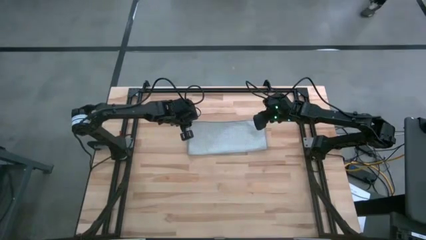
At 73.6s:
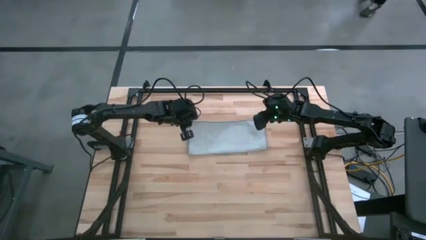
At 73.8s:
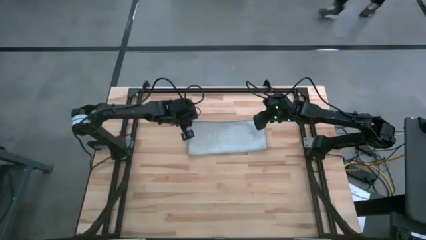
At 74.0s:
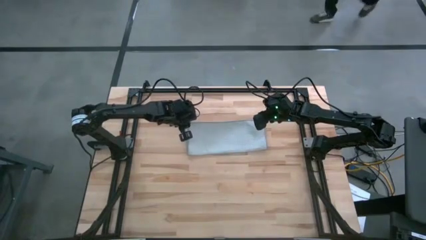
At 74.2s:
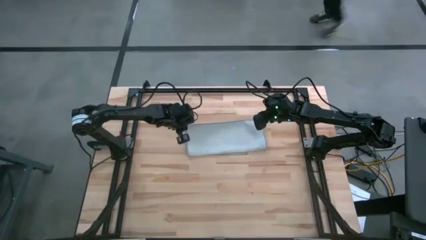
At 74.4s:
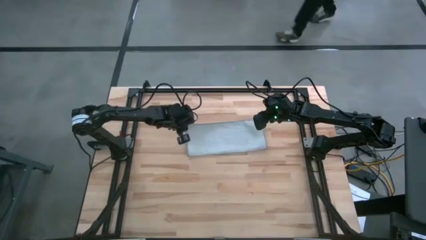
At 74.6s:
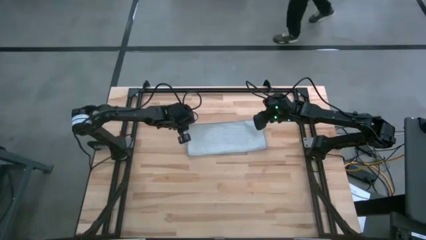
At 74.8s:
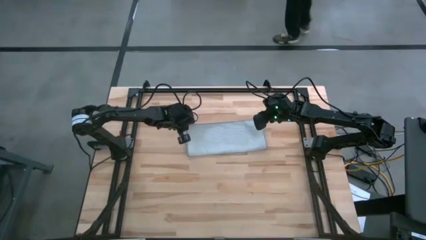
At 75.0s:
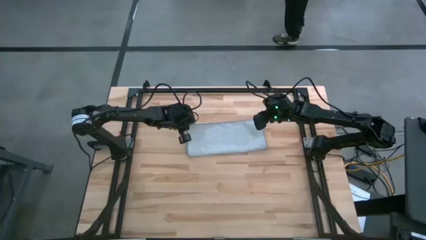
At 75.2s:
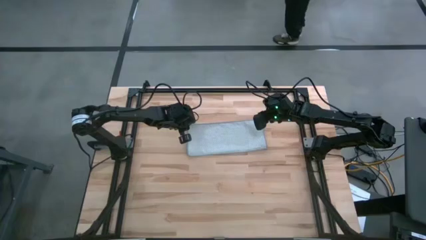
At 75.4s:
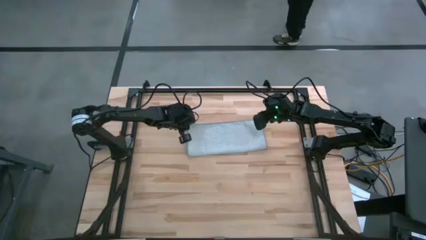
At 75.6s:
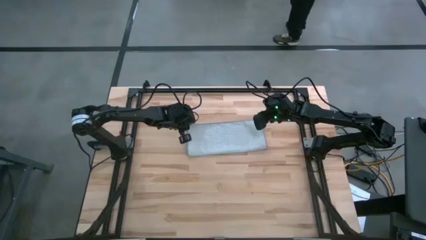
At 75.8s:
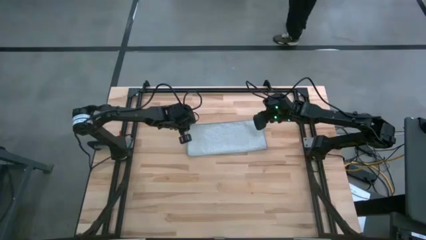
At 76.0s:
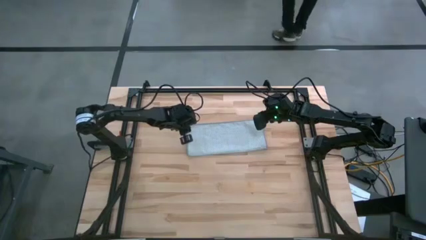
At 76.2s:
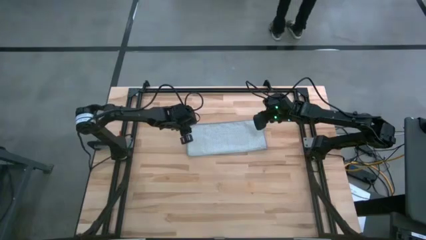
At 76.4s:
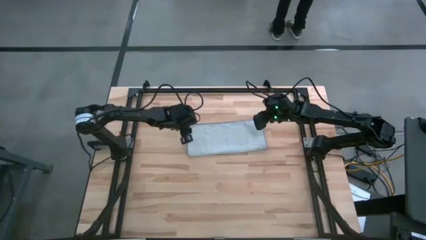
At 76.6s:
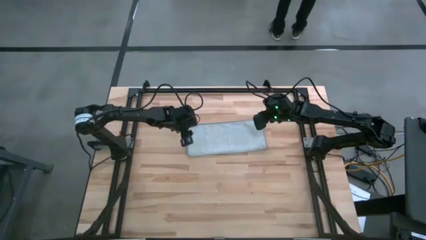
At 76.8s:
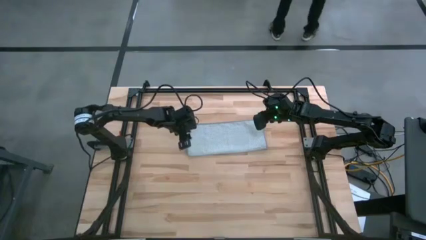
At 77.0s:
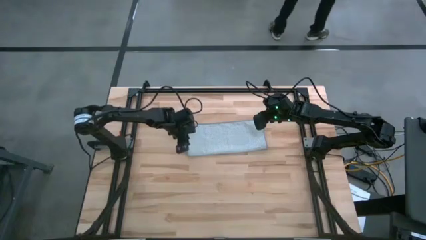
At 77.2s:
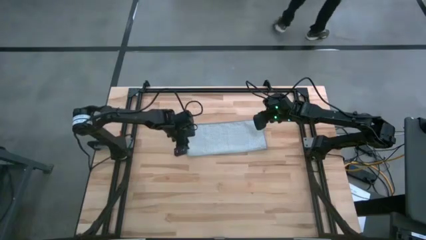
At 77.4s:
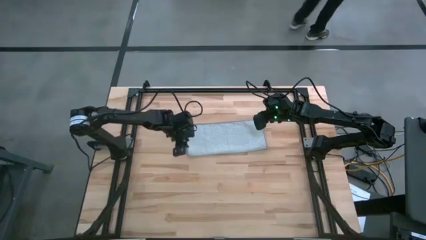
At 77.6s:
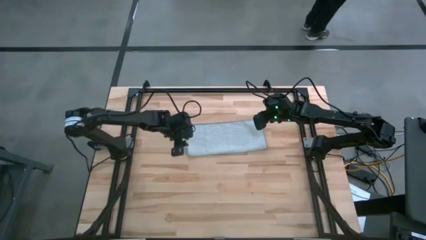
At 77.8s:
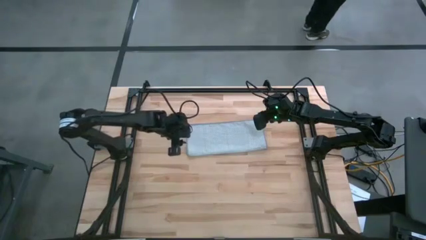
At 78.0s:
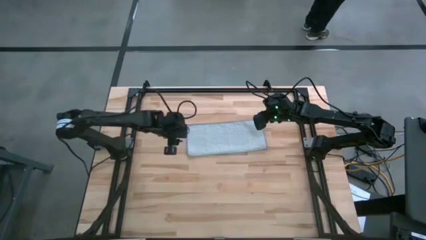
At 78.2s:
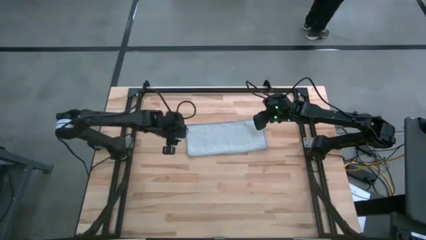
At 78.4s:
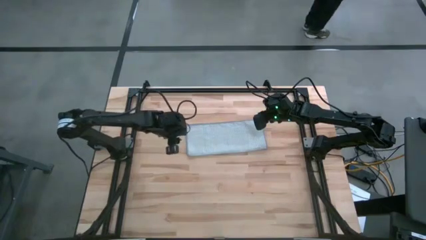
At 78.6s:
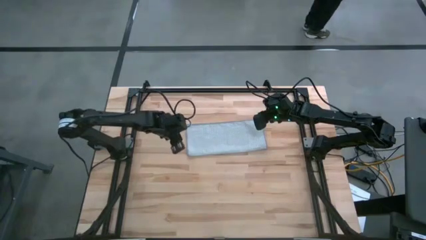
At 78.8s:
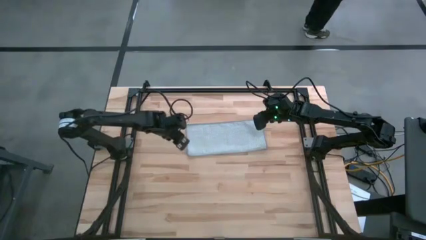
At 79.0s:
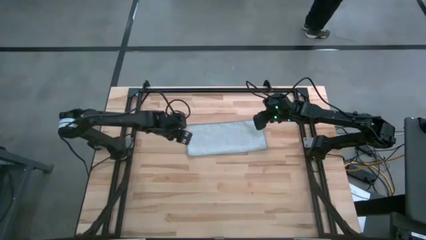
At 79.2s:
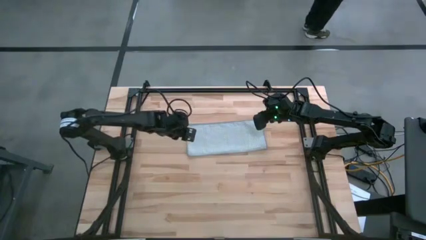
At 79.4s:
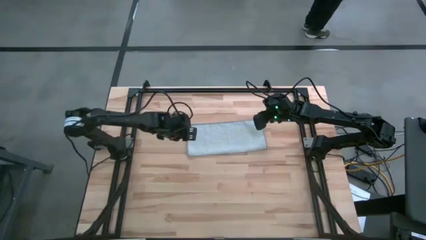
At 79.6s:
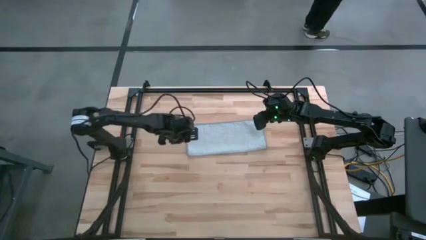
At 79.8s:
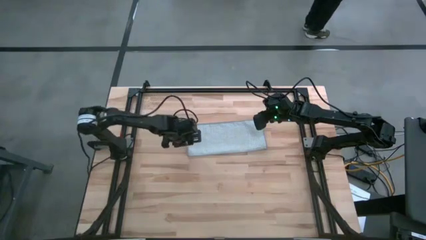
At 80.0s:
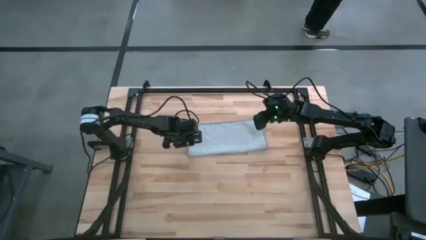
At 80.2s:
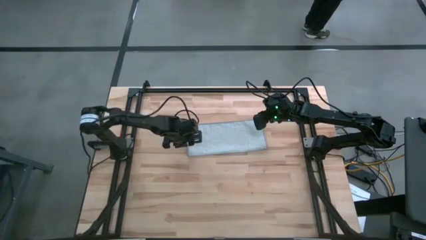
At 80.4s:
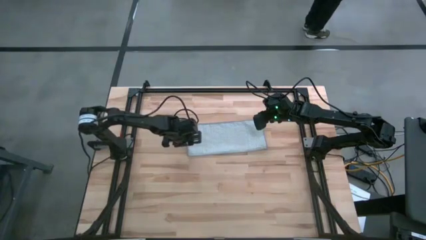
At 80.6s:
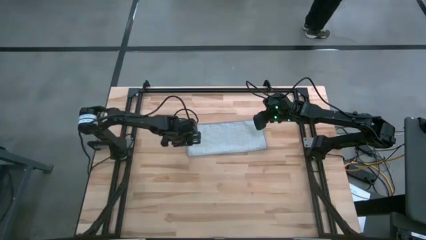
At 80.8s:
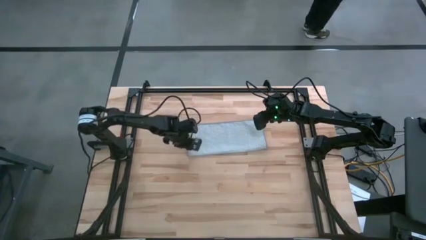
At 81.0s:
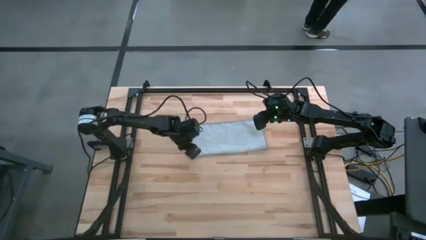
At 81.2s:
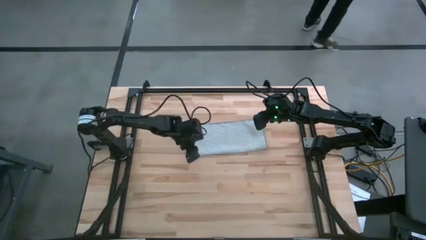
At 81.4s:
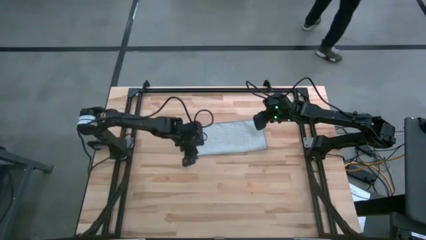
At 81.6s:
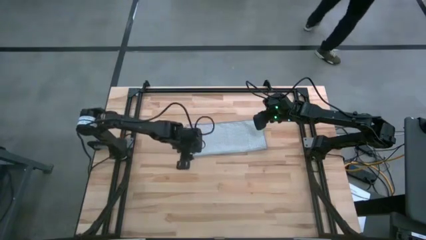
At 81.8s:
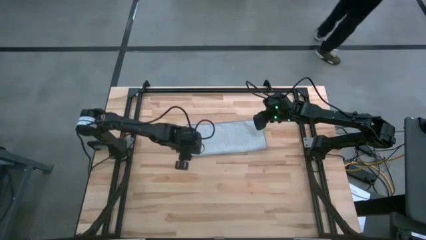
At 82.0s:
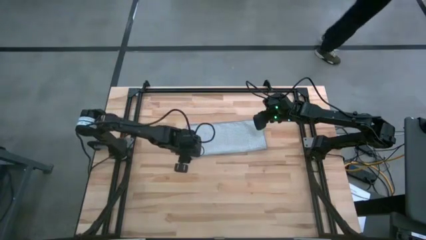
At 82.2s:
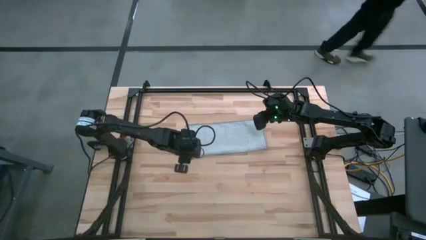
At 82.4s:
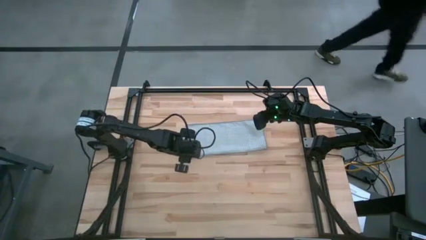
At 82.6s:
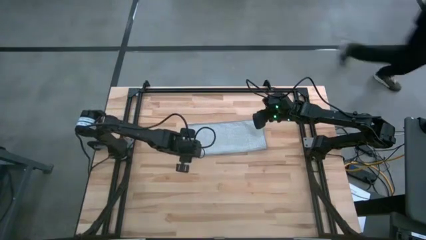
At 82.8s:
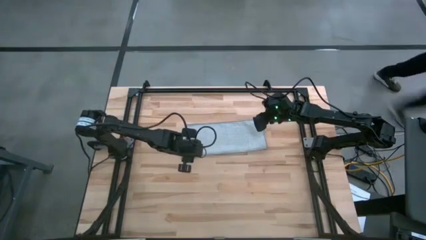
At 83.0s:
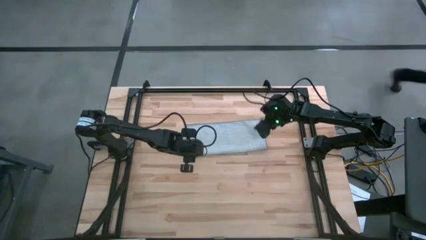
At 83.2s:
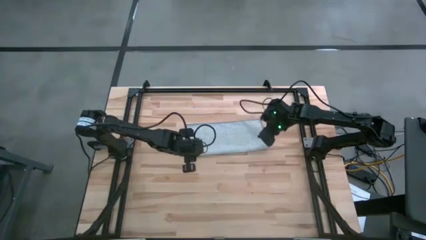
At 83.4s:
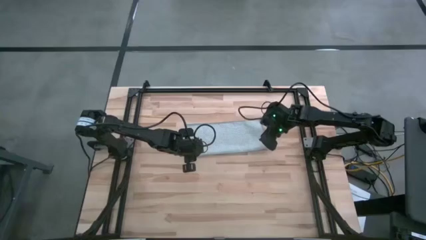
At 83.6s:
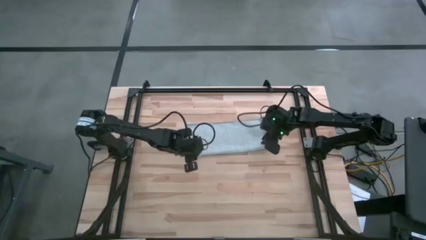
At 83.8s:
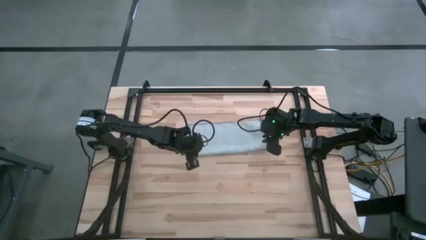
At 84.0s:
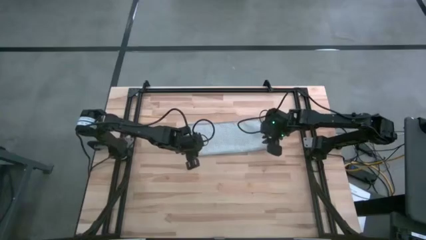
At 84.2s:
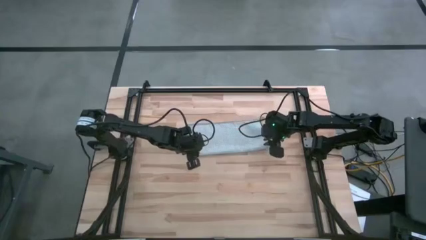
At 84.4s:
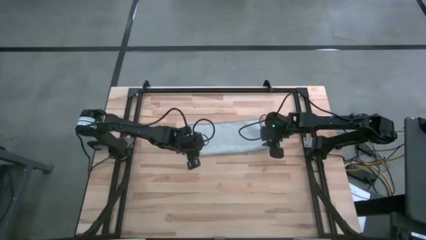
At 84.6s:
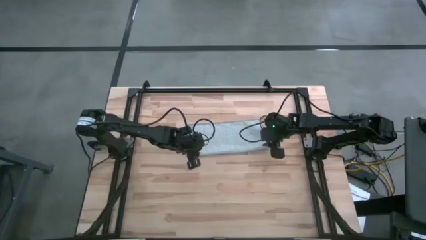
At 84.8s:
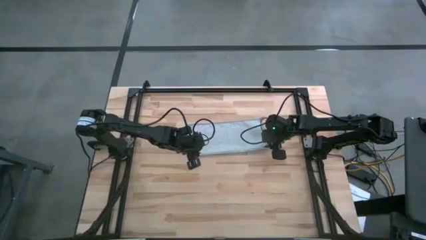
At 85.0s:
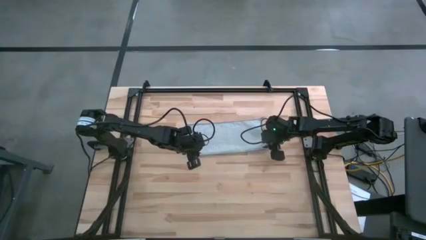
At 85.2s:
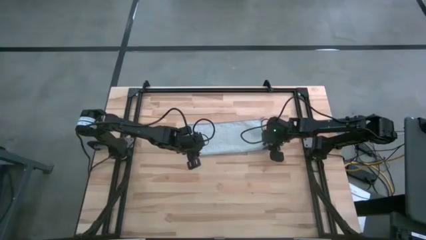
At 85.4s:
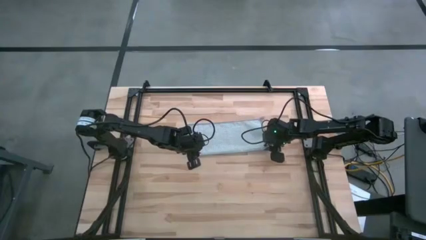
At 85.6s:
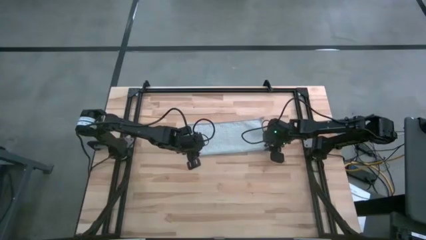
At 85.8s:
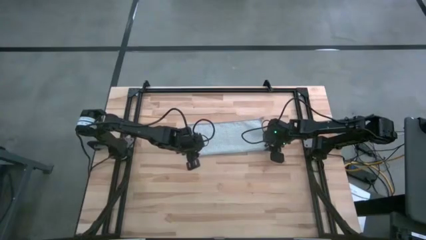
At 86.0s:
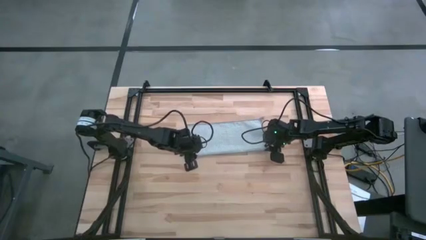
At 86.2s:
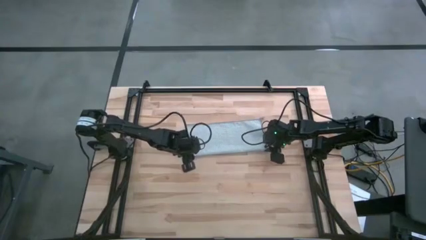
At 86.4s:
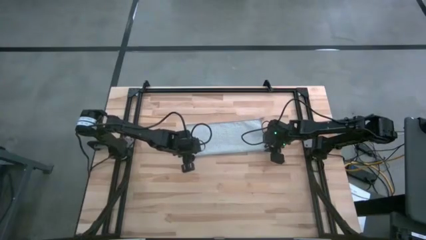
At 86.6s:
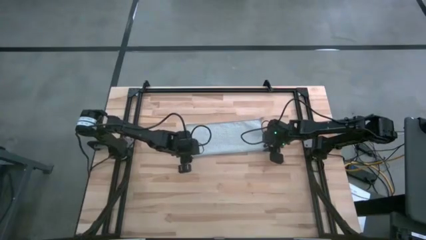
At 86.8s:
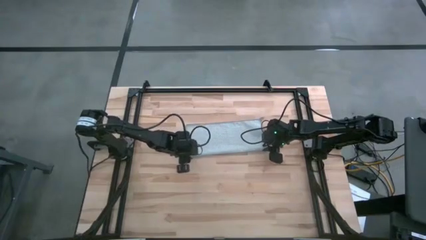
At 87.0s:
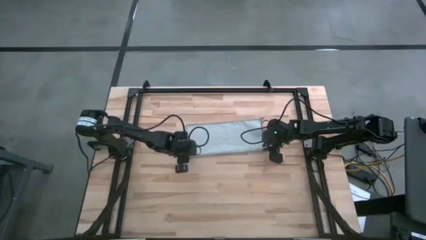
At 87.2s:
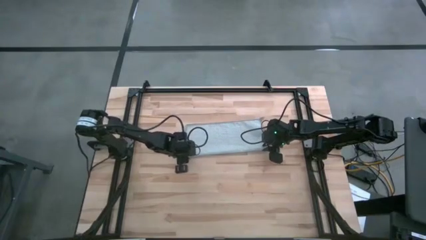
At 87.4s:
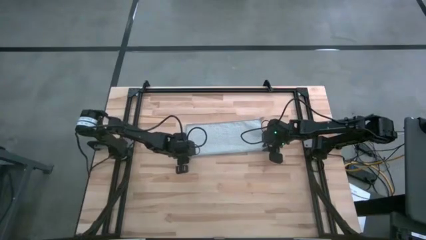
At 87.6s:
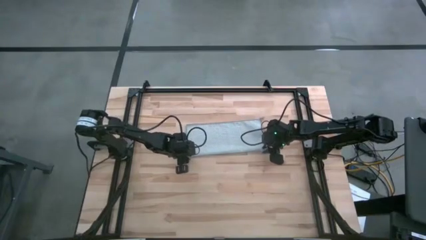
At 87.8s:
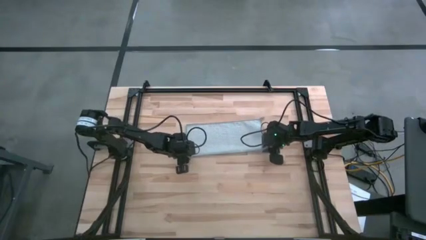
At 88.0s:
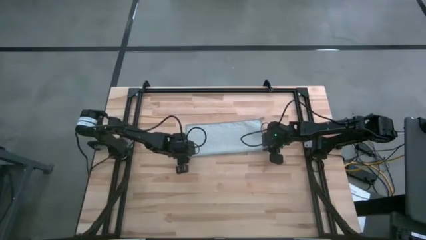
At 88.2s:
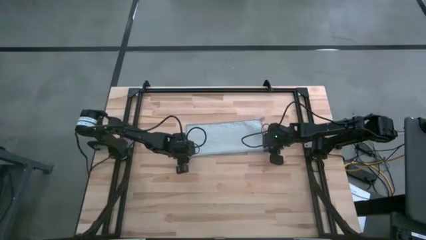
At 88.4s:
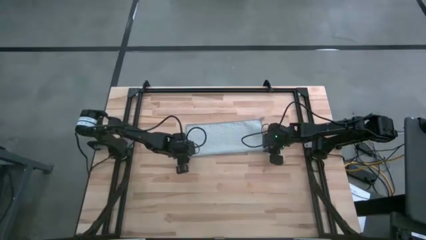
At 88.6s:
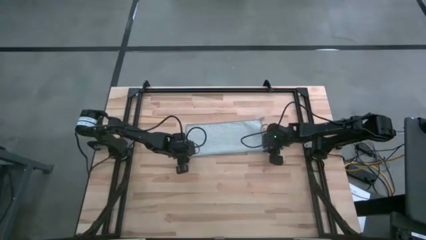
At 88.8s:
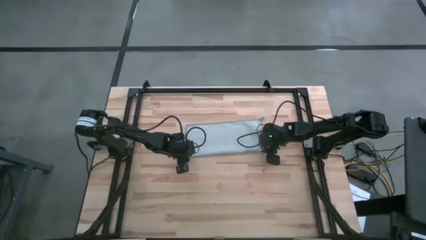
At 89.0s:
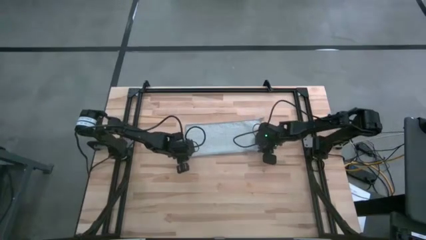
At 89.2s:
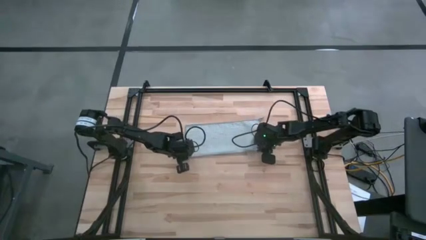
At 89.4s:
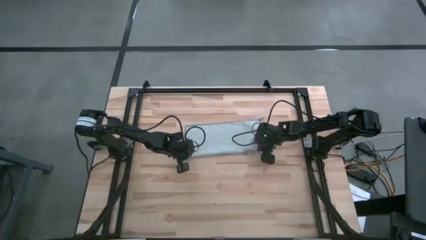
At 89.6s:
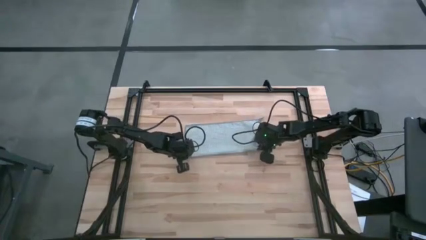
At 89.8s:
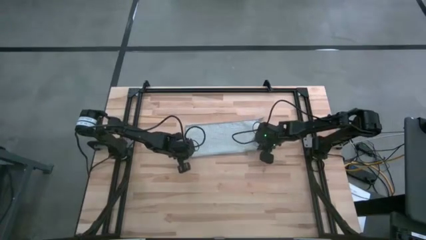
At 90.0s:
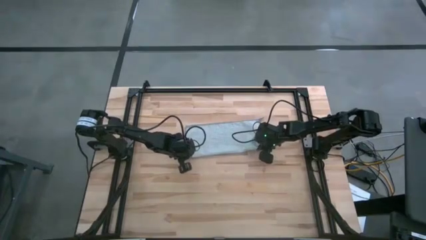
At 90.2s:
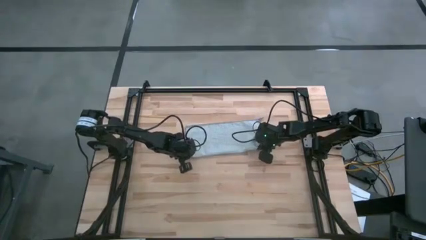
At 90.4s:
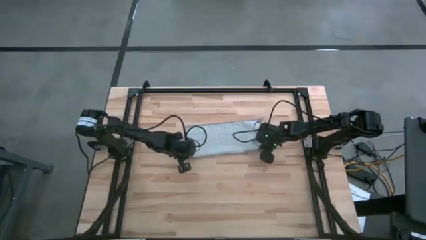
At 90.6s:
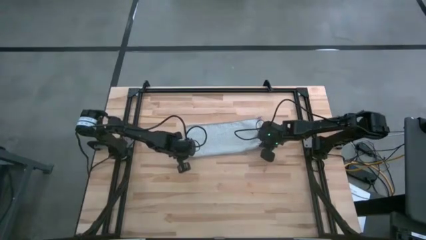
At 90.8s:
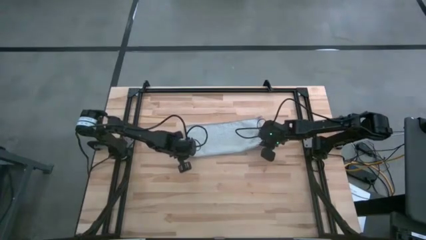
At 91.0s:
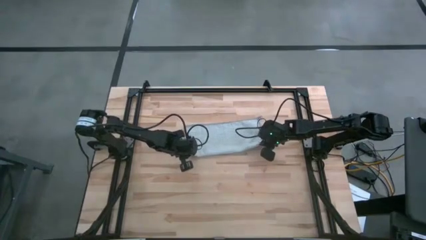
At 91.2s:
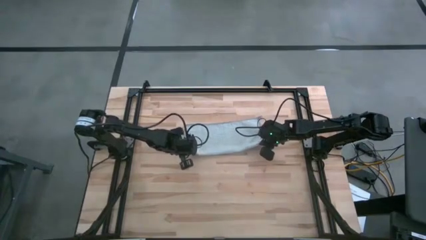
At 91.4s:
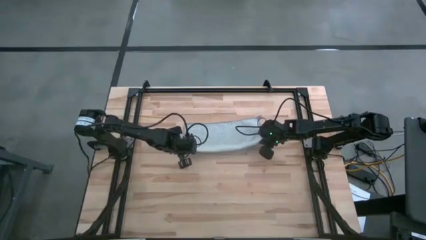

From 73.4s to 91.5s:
Task: Fold microfiber towels
Fold the gray on the table
